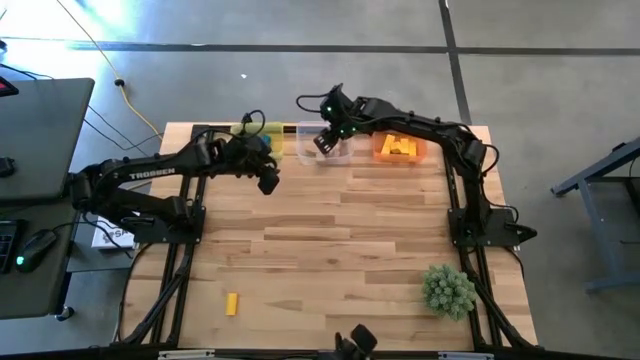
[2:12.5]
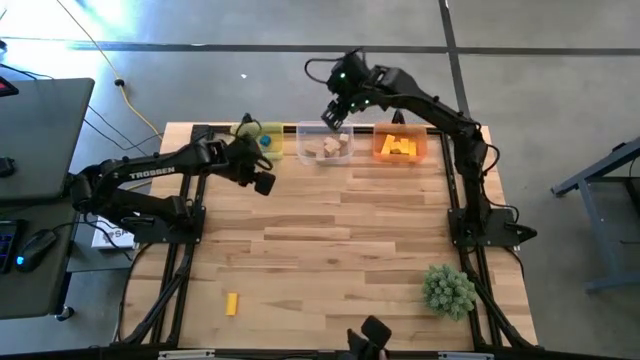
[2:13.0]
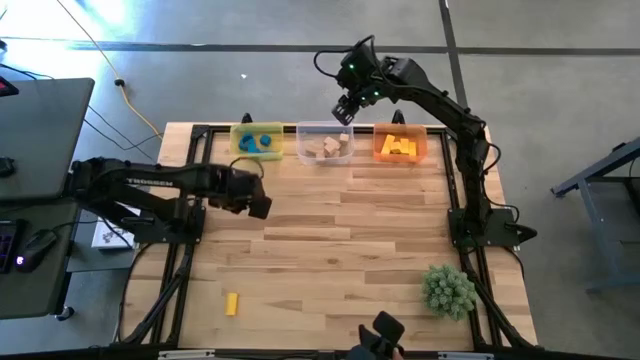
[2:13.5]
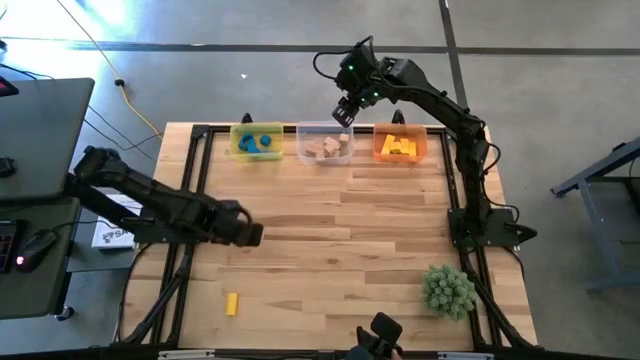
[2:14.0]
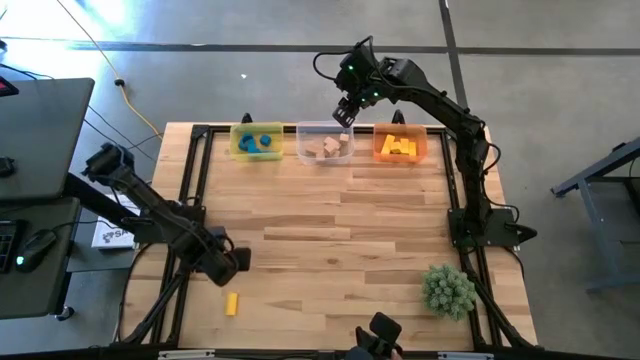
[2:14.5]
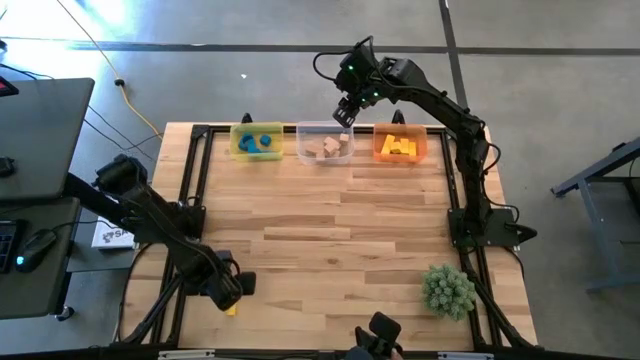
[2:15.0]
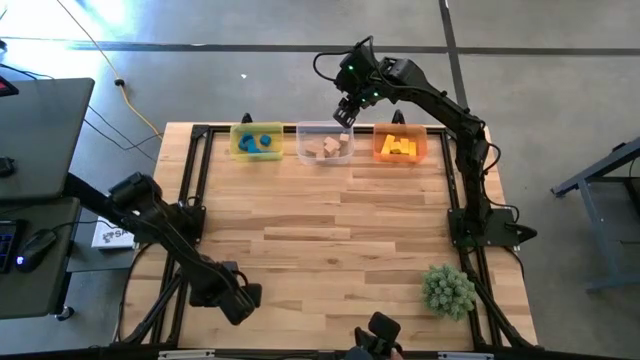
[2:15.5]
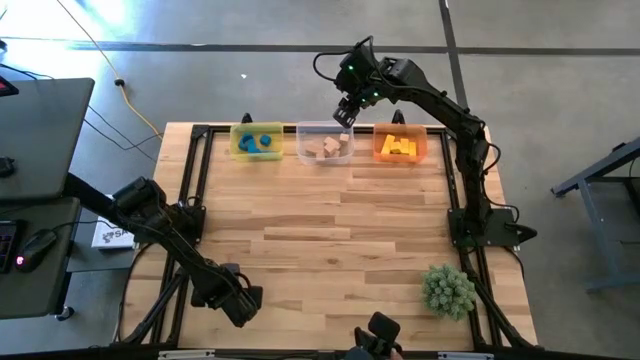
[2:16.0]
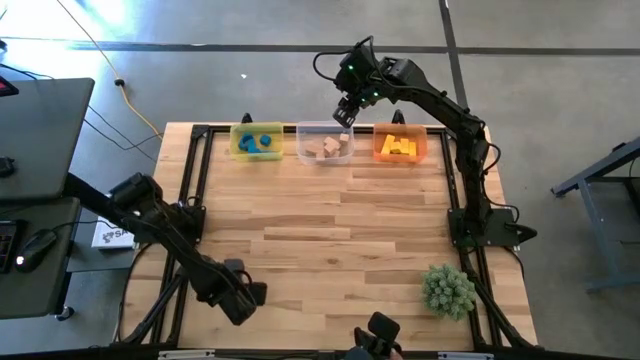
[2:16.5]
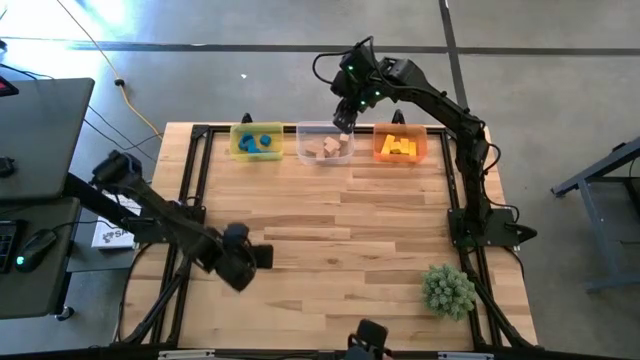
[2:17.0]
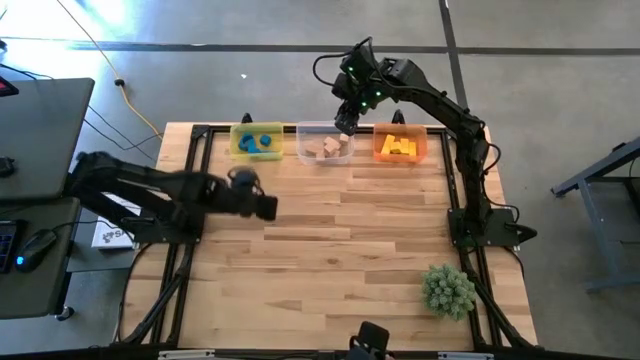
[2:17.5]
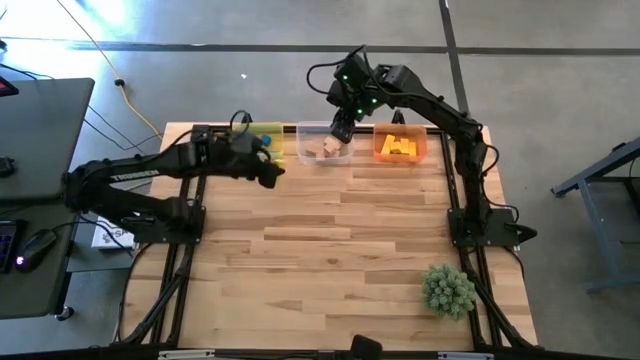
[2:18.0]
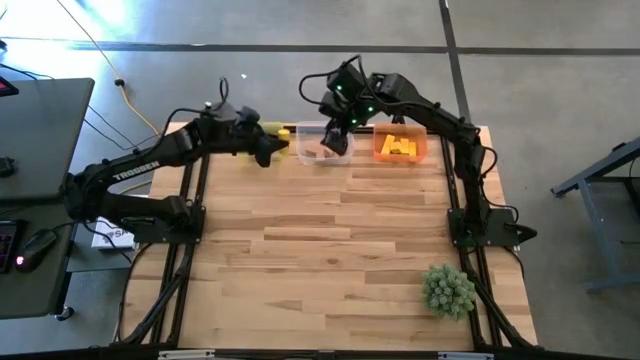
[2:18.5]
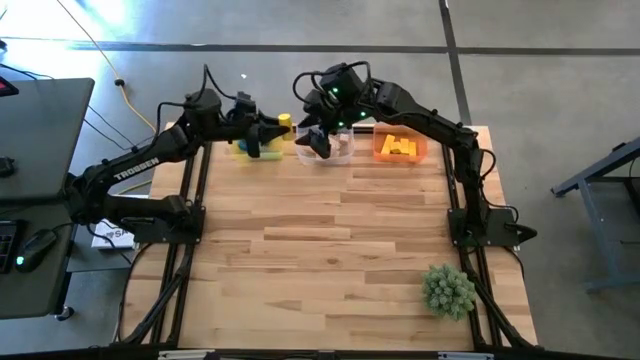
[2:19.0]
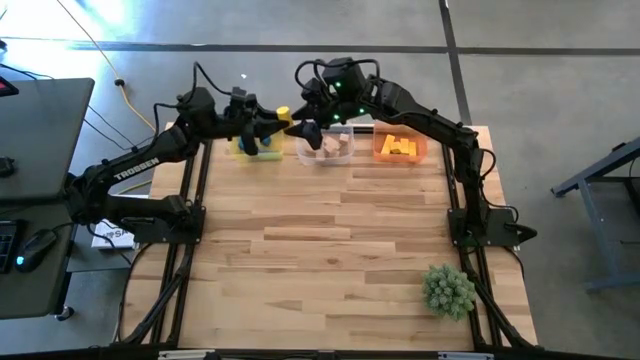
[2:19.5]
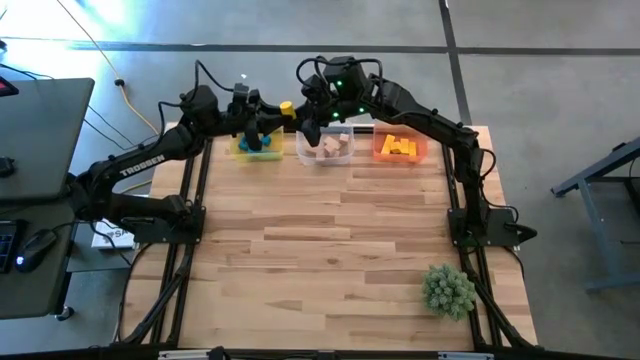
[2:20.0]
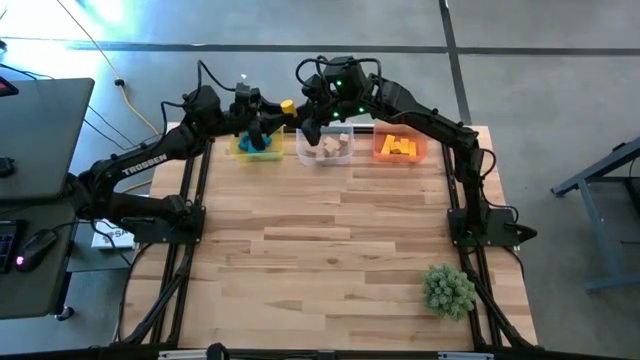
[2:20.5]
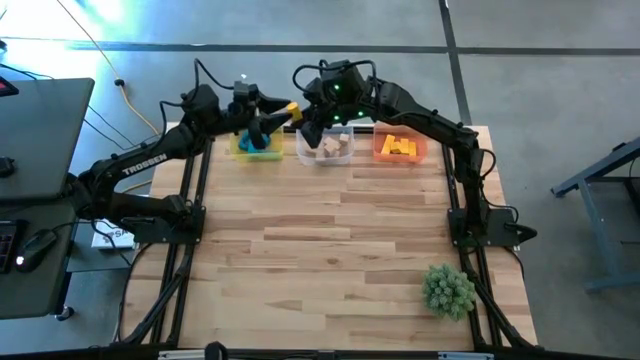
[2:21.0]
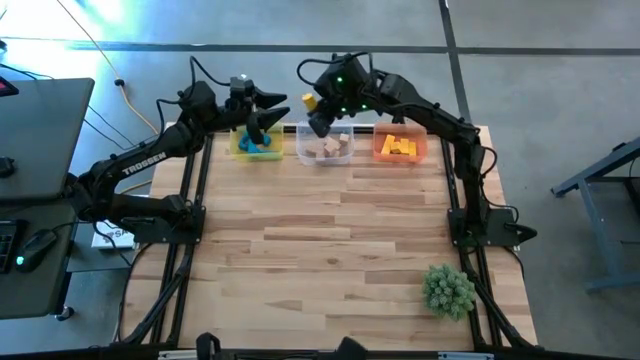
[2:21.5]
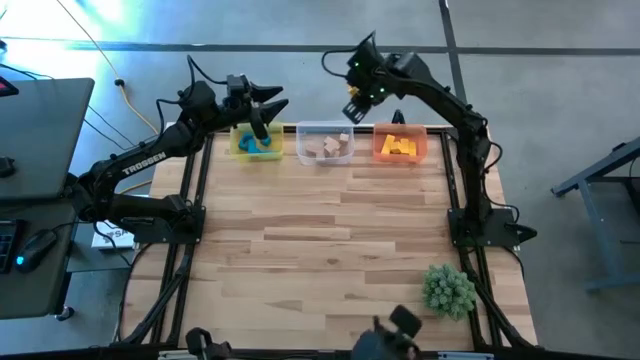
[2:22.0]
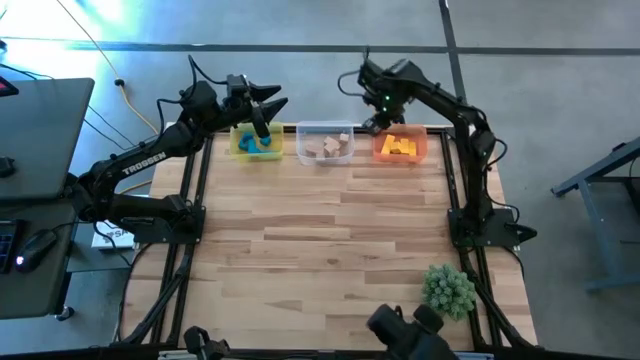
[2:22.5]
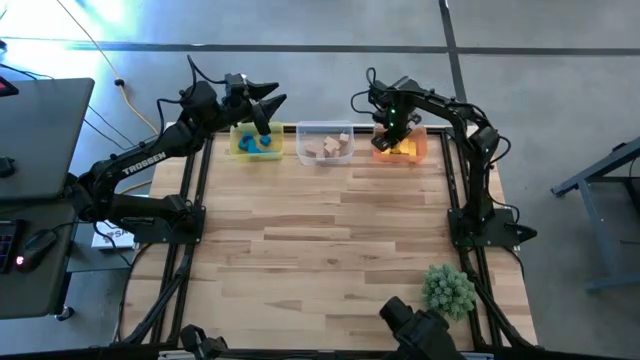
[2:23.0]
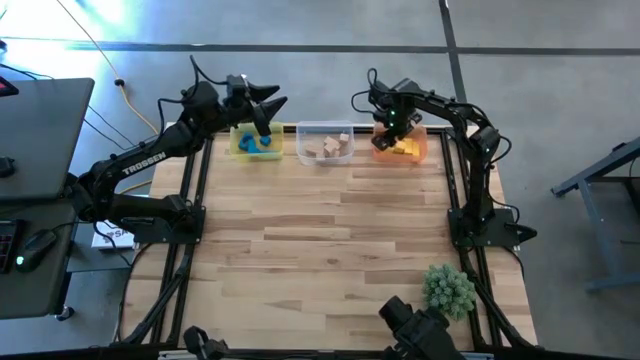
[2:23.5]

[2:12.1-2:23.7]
Task: Sort & place blocks by color
Put the yellow block into the orange bin

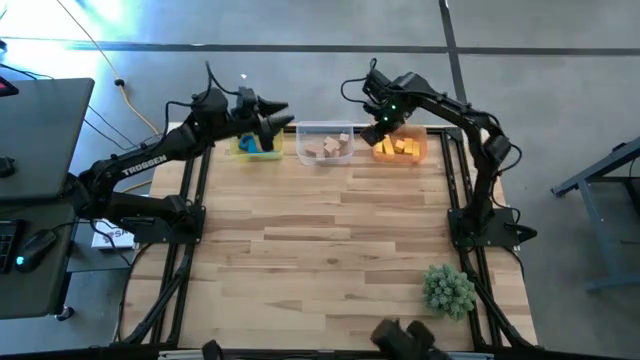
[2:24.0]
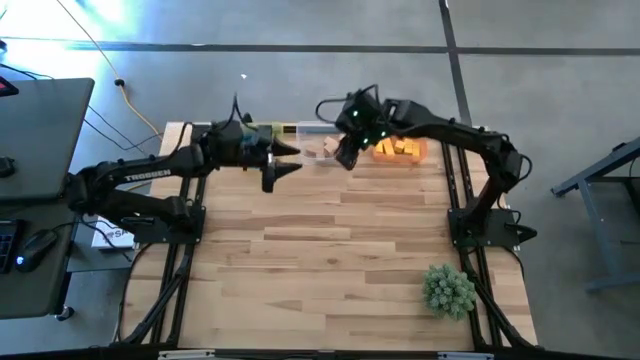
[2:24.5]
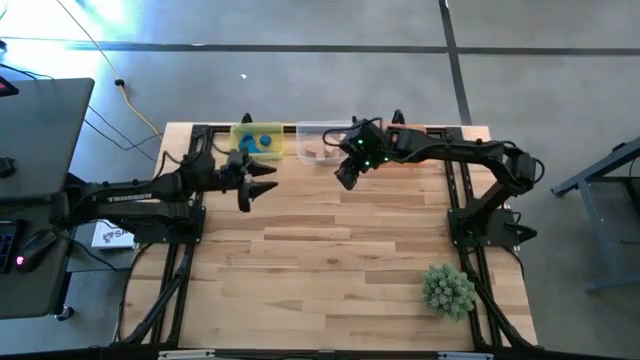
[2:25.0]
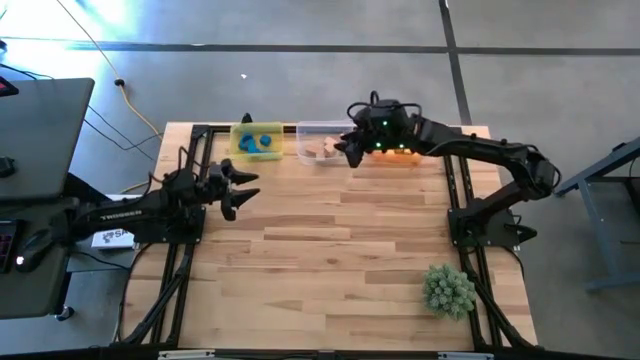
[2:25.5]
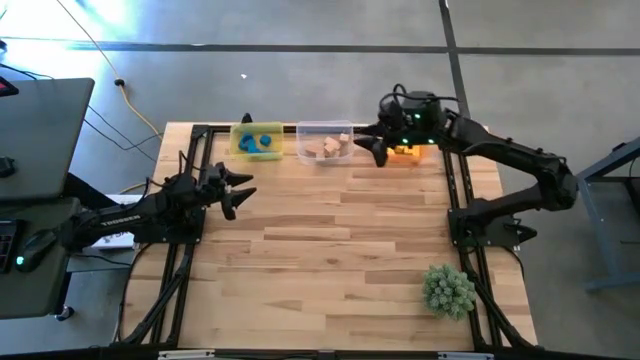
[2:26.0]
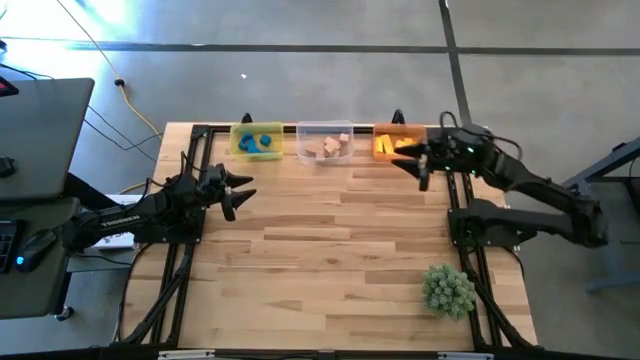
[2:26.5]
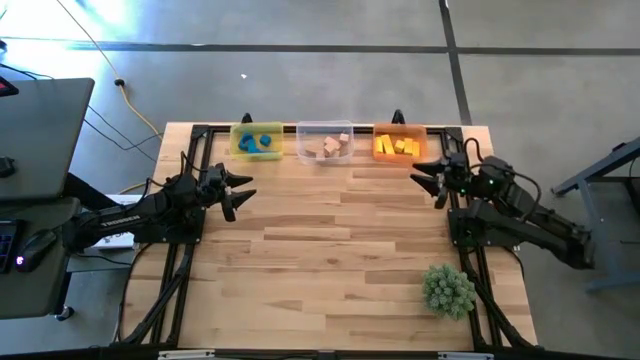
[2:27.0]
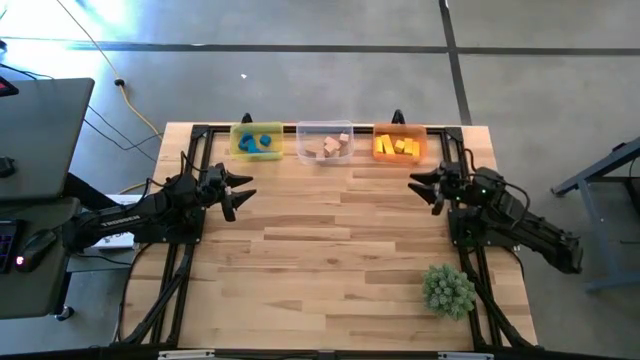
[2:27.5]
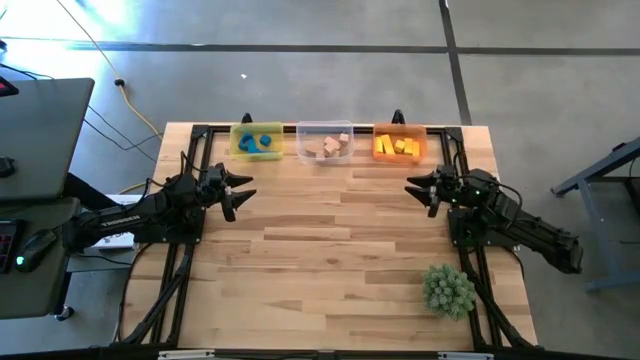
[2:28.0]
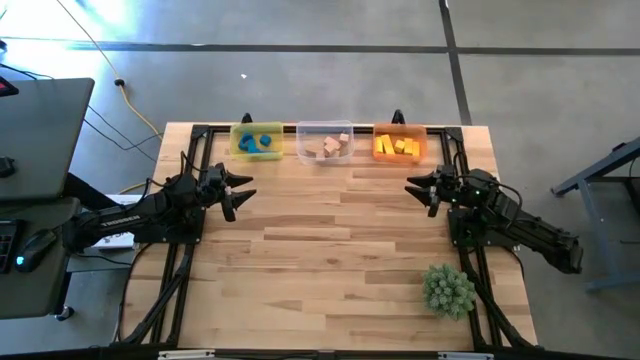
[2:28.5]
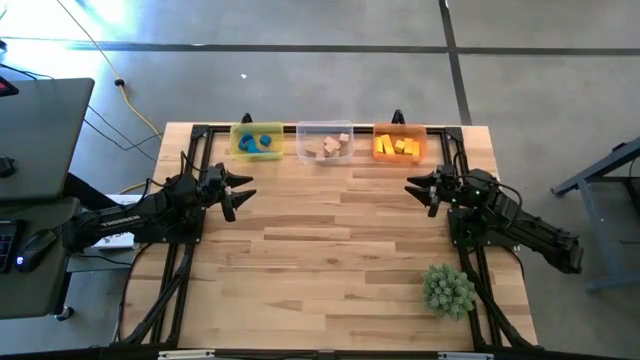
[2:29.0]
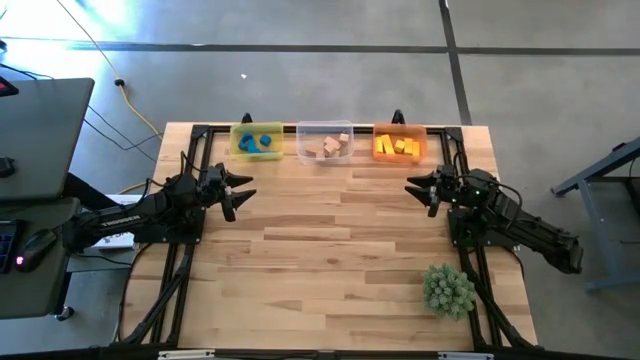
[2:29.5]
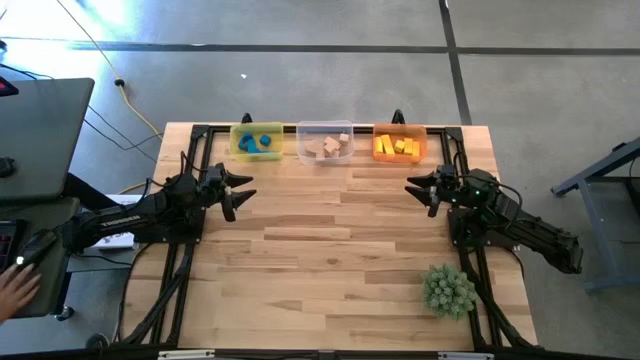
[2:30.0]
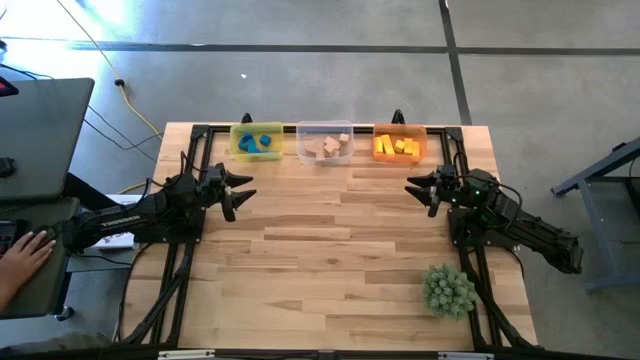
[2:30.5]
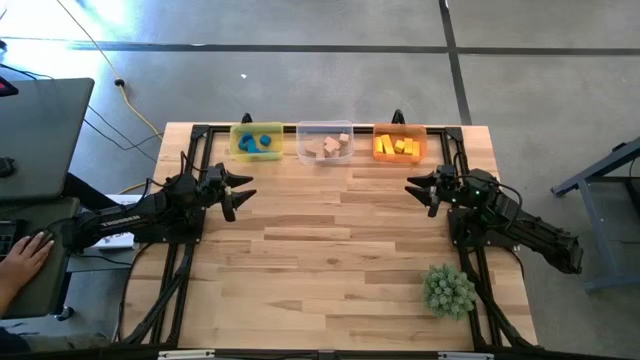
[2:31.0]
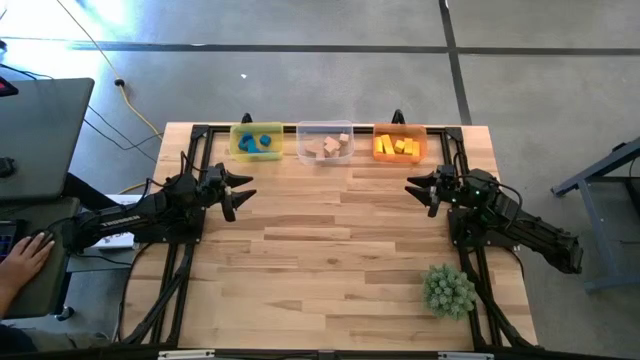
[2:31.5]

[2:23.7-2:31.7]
Return to Home Position

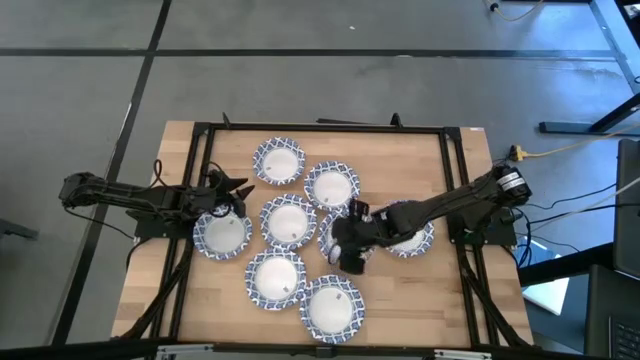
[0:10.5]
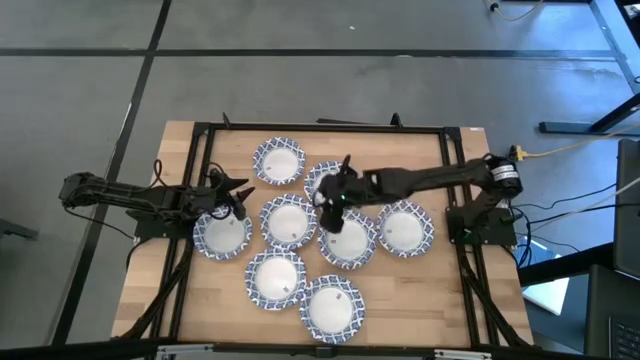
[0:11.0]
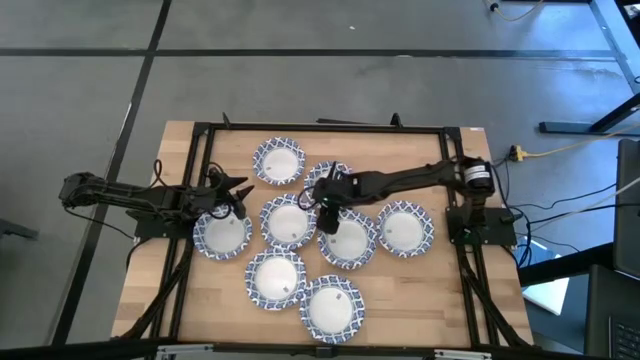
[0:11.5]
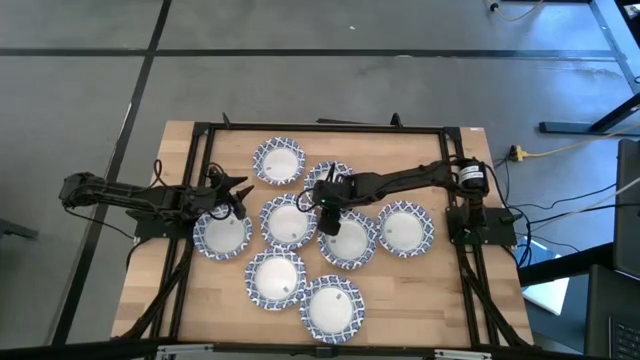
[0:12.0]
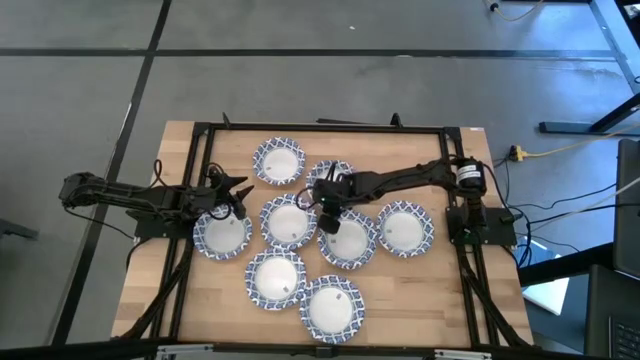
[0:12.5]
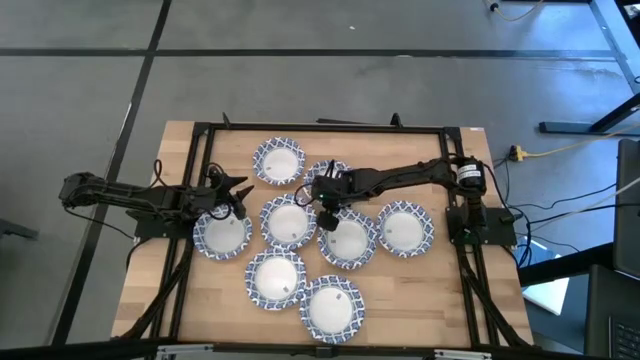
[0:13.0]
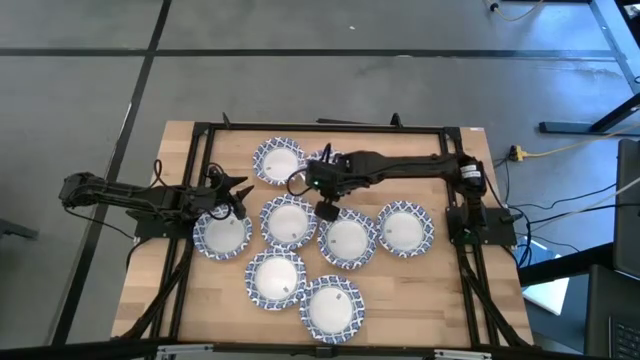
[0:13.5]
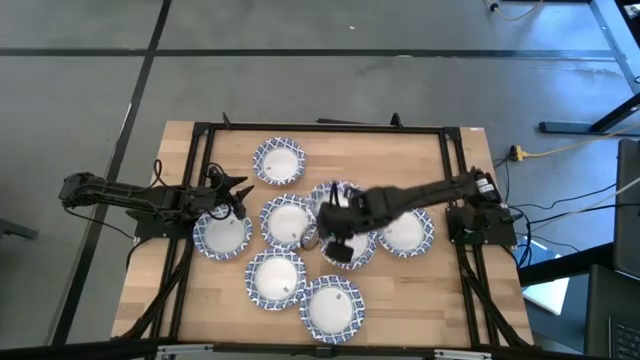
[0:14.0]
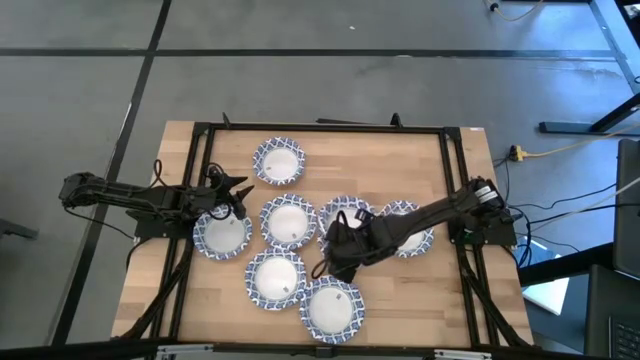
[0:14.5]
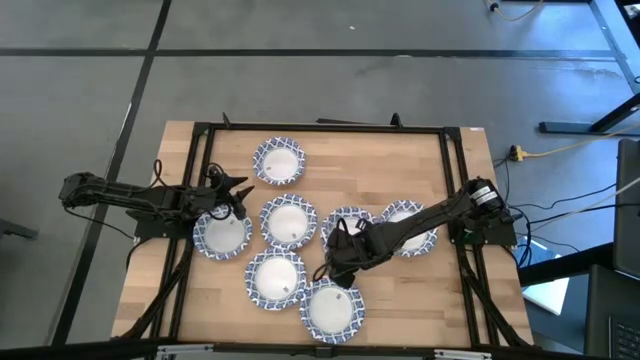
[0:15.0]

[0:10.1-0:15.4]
Task: Nest bowls inside each other
Stack the white patterned bowls on top of the other white patterned bowls
